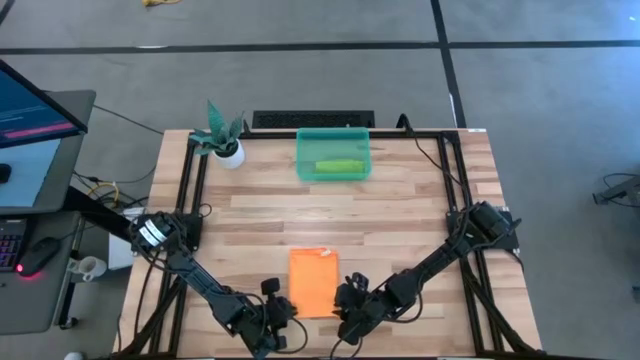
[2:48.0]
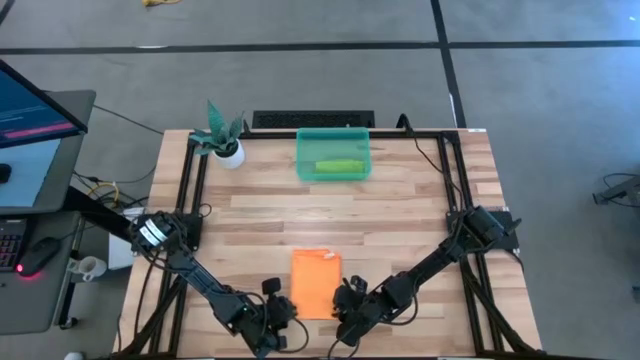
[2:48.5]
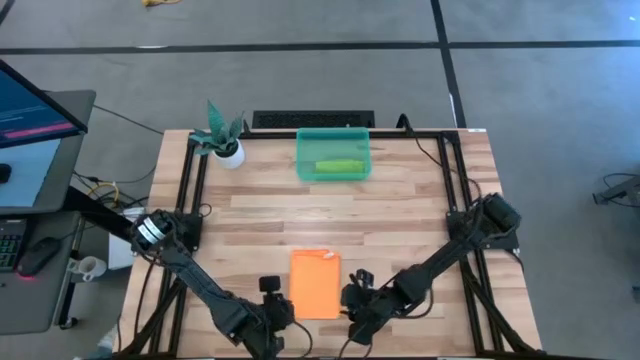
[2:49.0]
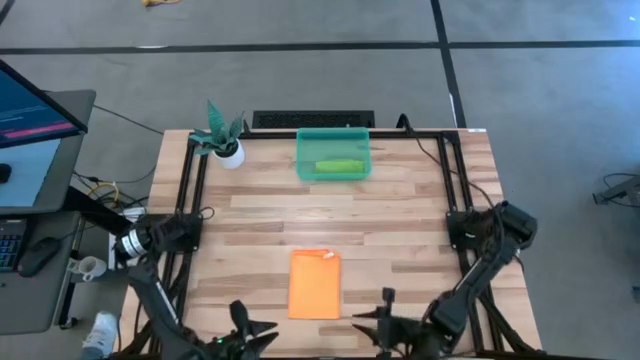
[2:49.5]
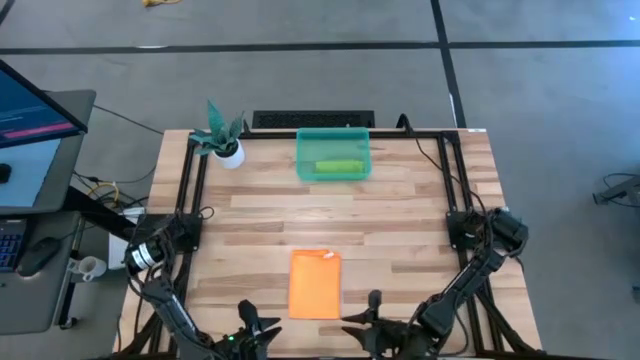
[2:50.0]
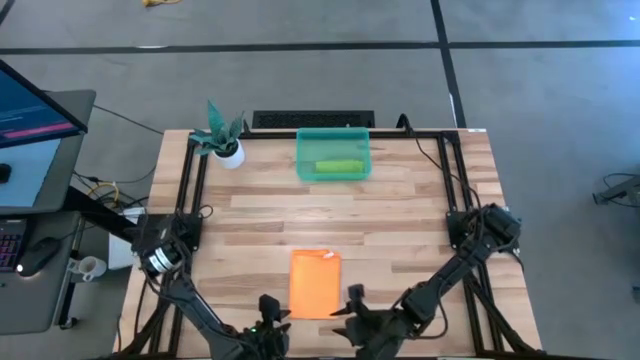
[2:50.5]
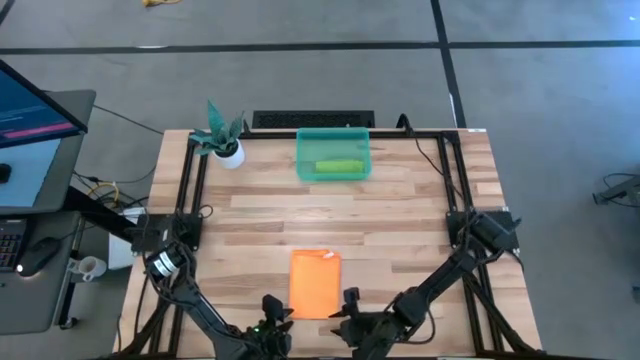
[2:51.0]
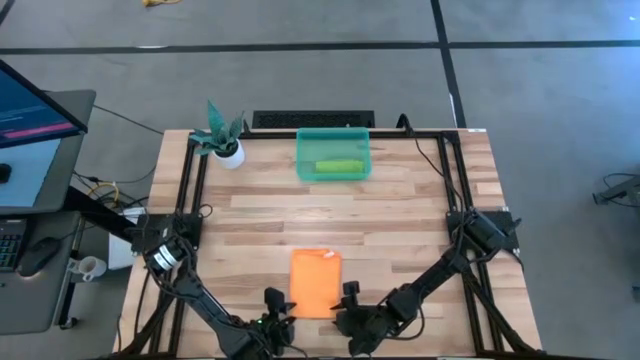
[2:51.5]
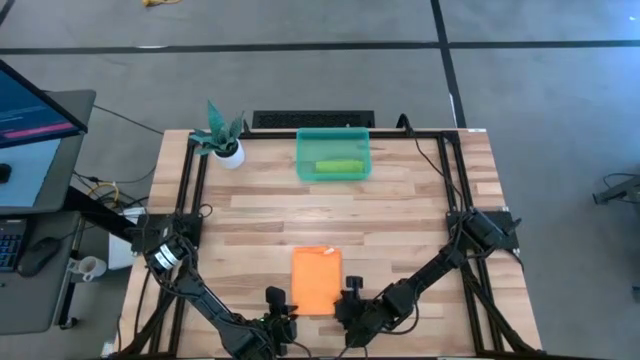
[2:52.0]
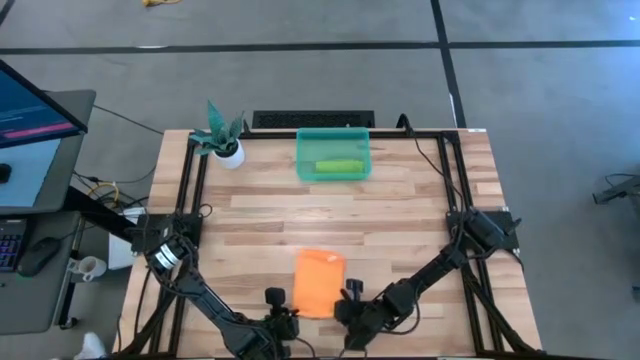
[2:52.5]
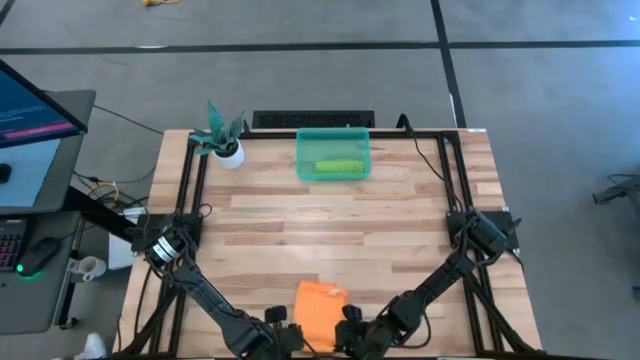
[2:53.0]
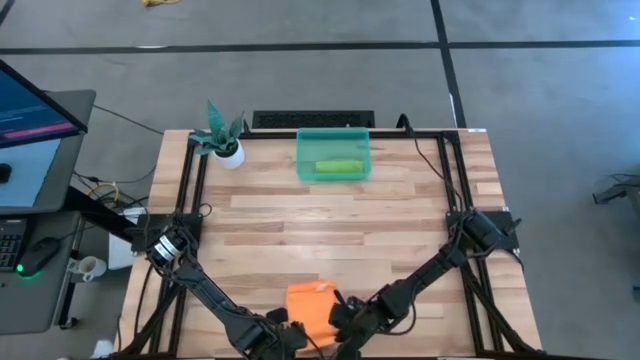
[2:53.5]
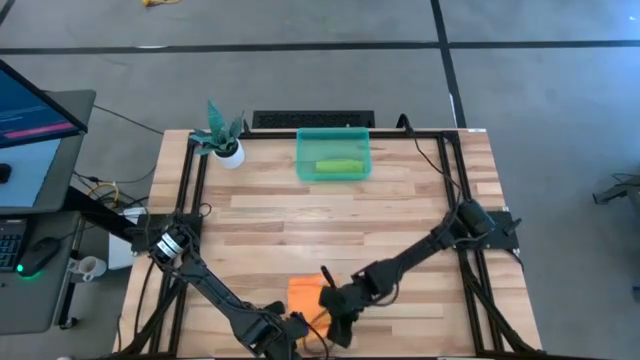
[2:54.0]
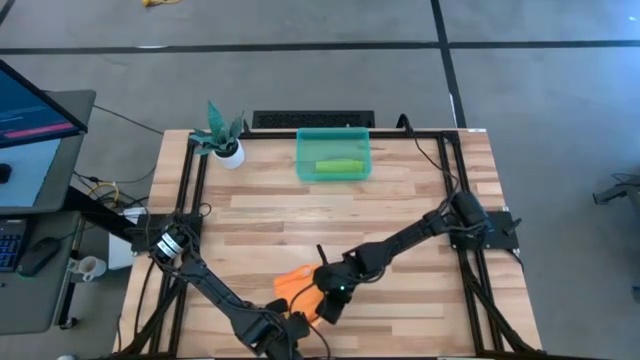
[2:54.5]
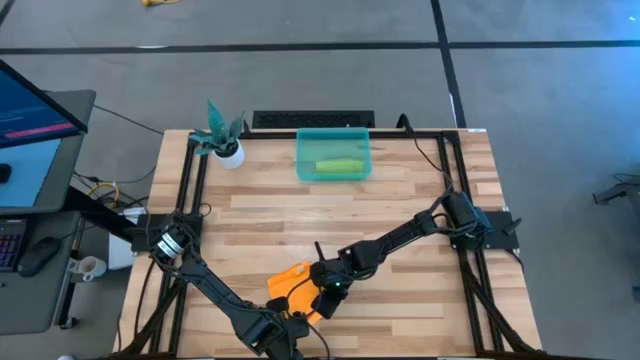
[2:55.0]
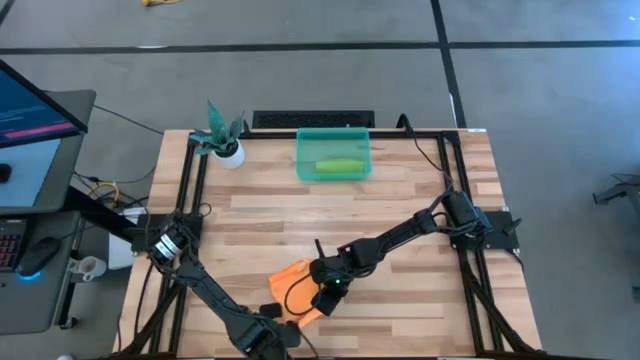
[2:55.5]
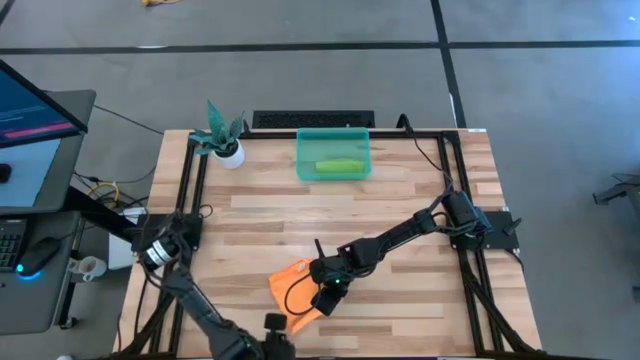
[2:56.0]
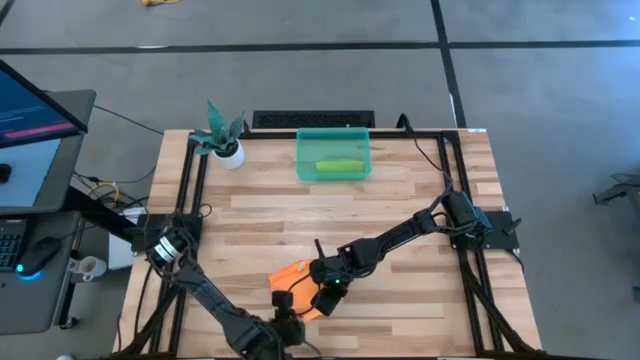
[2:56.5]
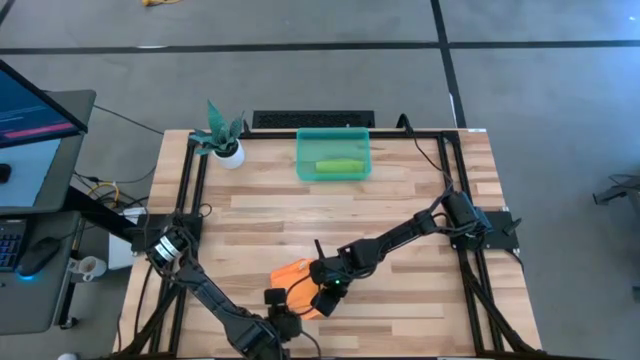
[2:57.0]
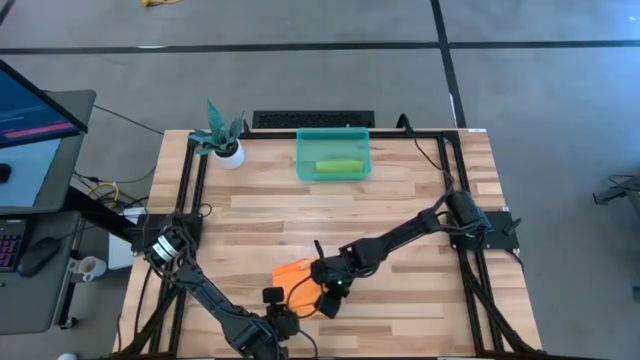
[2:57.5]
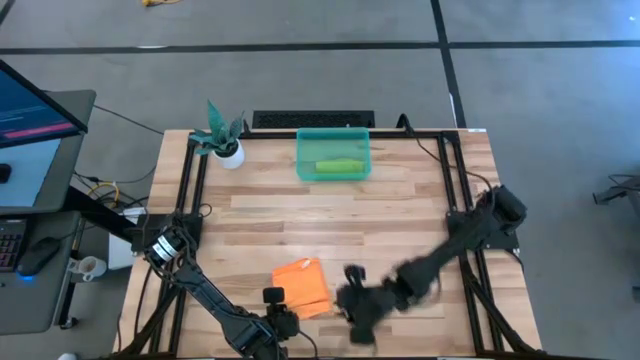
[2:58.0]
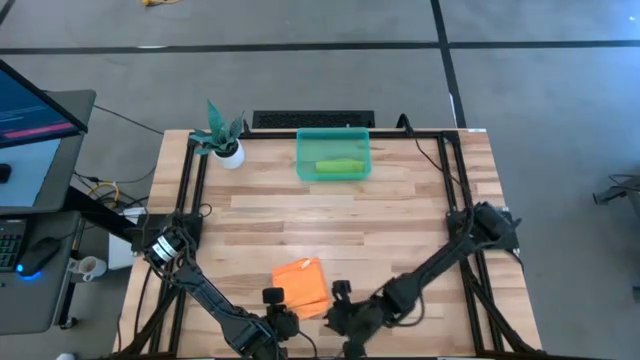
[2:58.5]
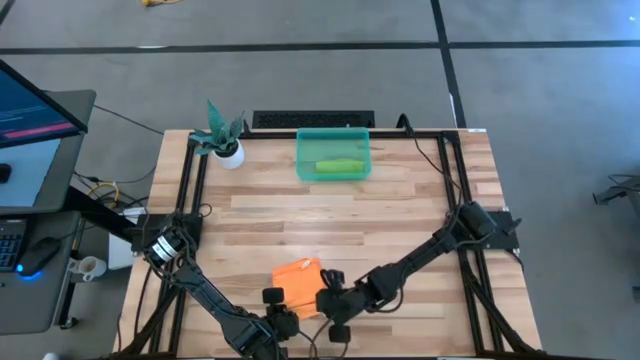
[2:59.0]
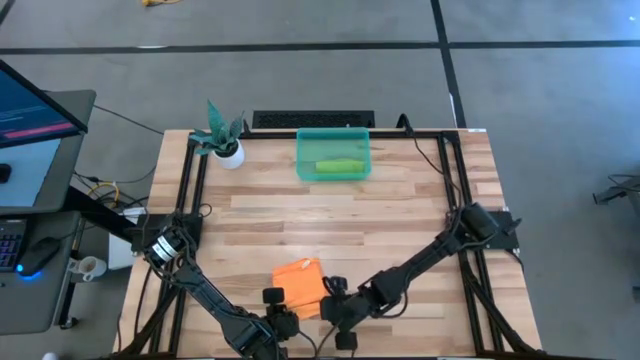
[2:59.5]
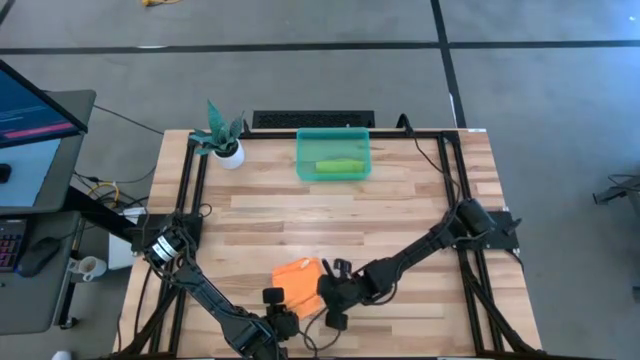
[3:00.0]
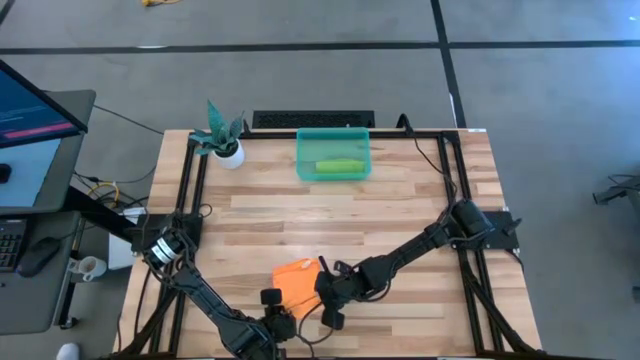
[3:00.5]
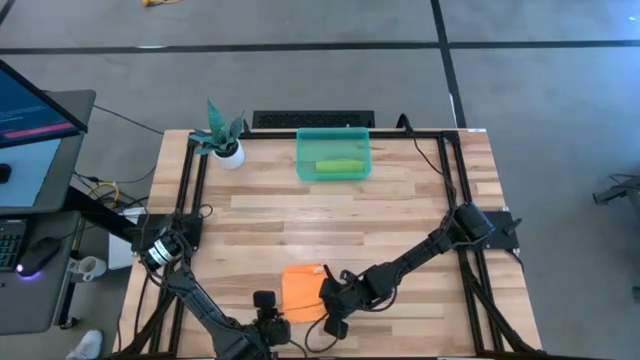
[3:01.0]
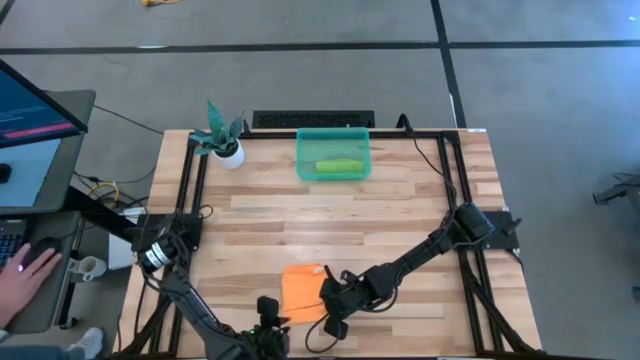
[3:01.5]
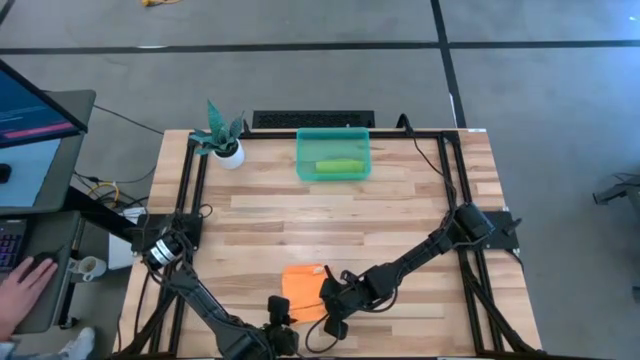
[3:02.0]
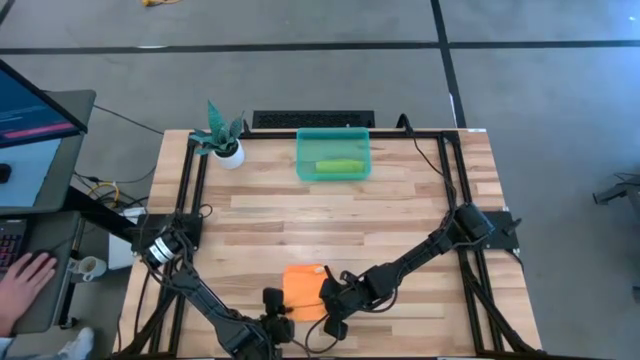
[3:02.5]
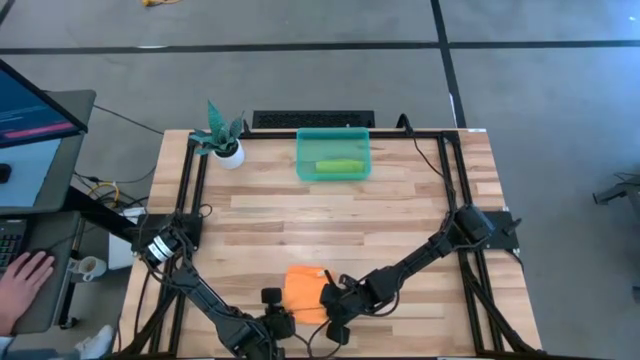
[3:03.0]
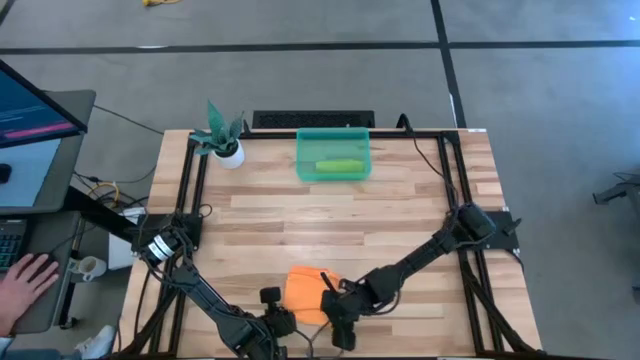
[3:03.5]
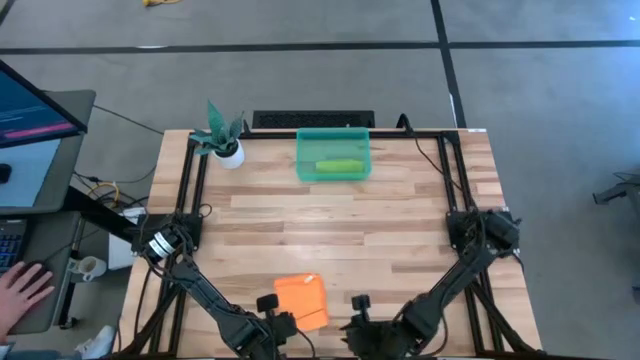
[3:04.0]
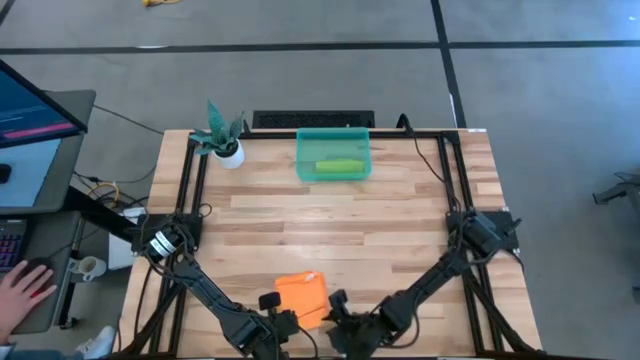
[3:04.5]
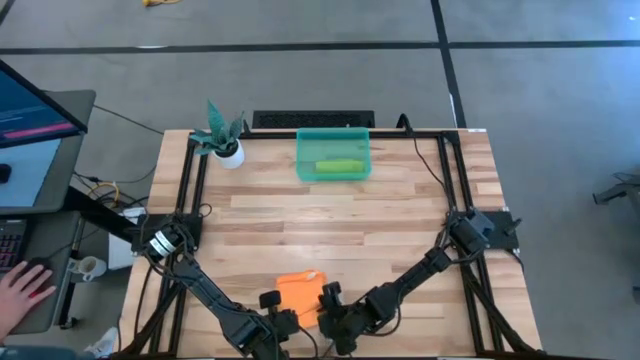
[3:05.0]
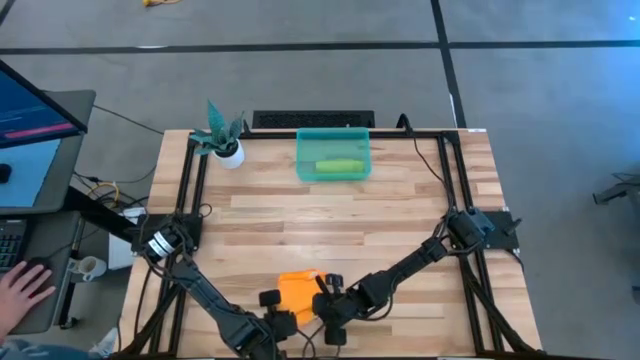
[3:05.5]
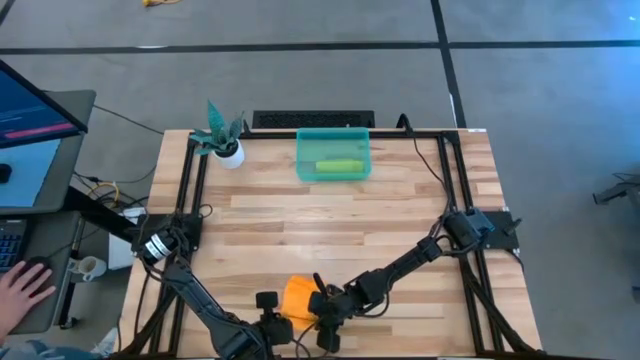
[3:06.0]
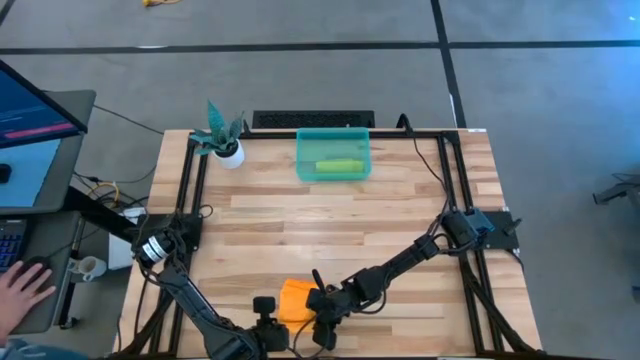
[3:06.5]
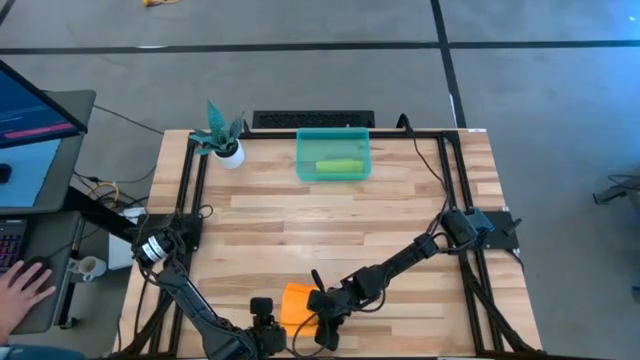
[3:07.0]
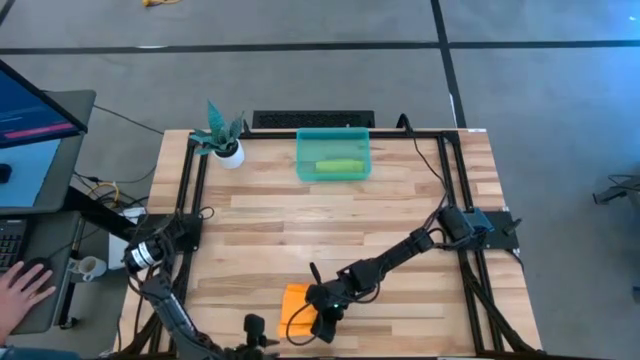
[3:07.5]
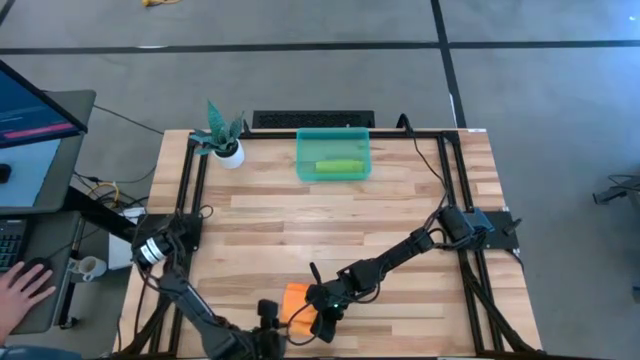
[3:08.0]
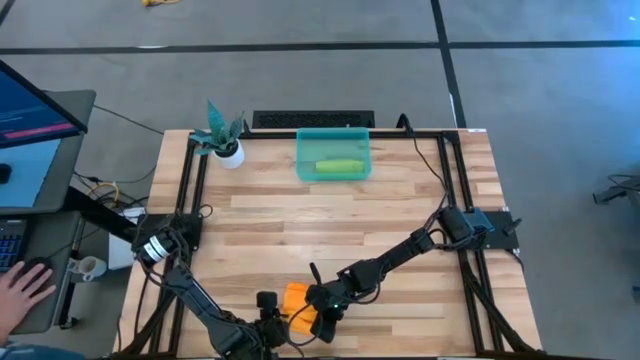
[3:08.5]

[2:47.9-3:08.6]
Task: Roll towel into tight, uniform cylinder
Roll the orange microfiber towel

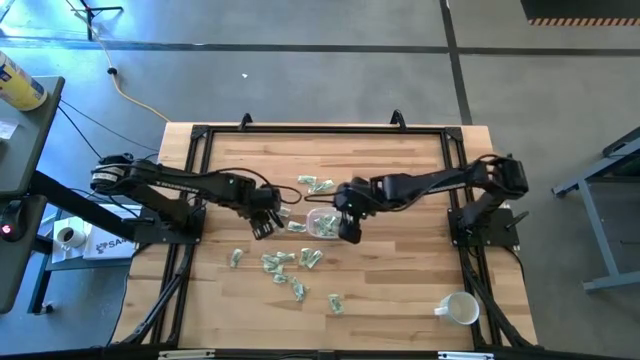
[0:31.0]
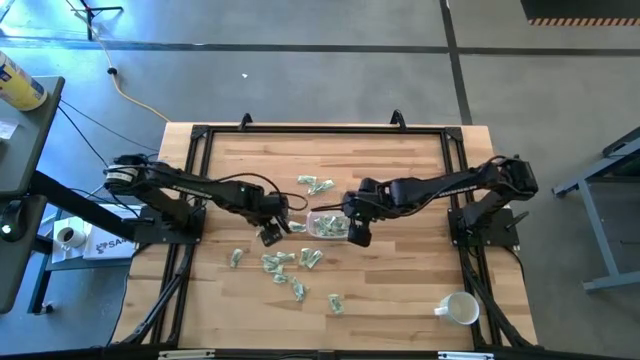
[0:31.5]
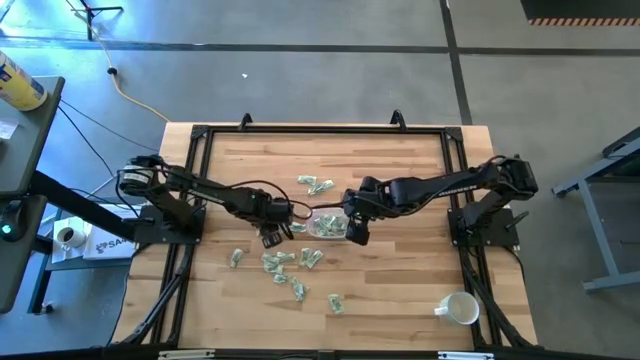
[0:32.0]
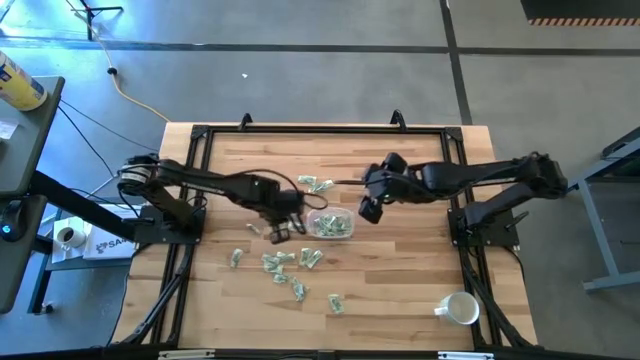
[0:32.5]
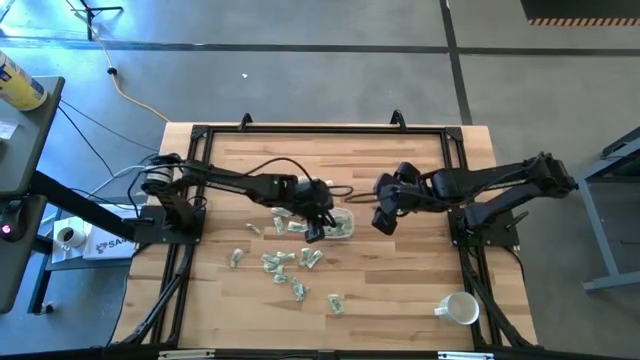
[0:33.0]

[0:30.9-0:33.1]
Task: Pick and place Stevia / Truvia into bins
Put the stevia packet into the transparent container
